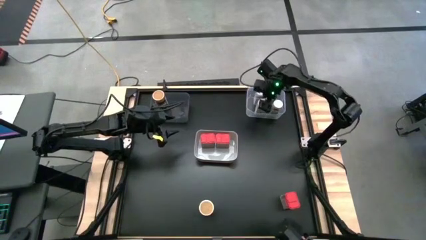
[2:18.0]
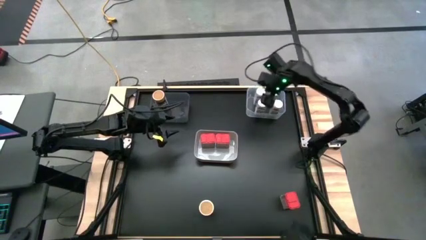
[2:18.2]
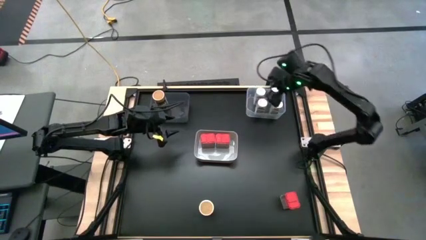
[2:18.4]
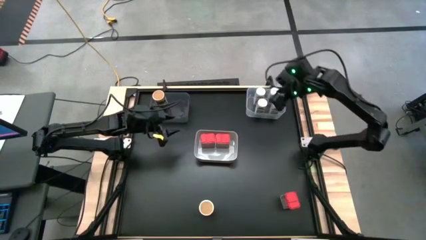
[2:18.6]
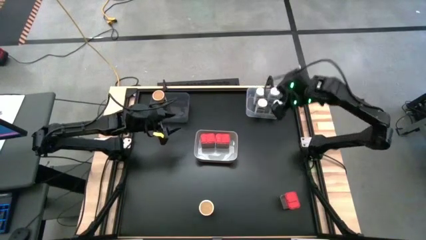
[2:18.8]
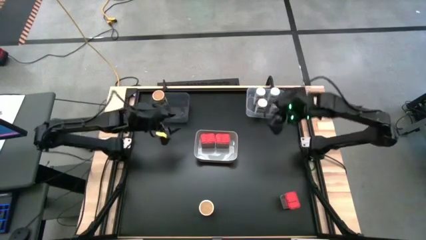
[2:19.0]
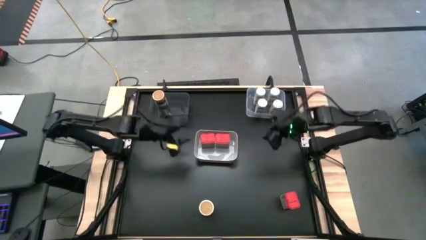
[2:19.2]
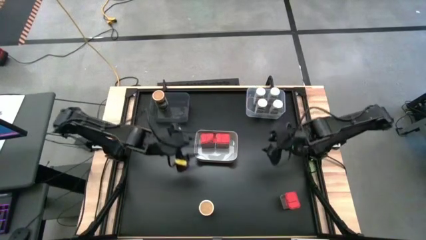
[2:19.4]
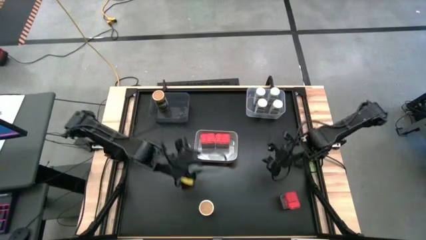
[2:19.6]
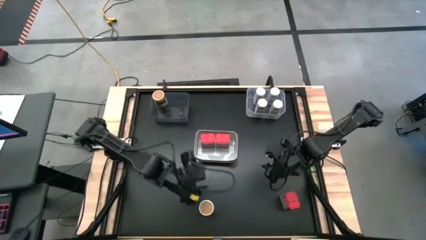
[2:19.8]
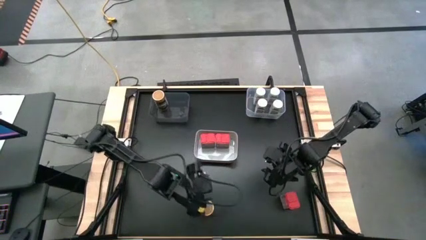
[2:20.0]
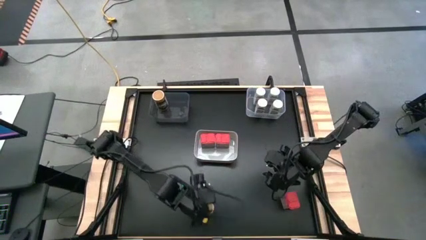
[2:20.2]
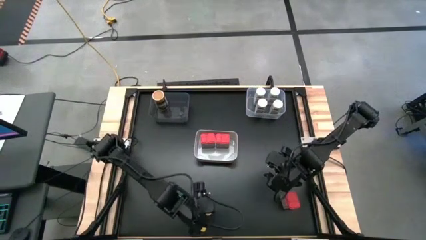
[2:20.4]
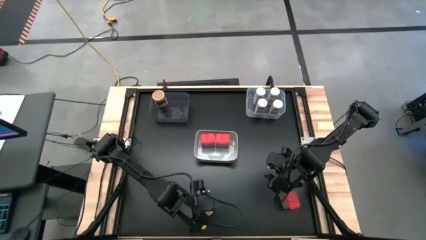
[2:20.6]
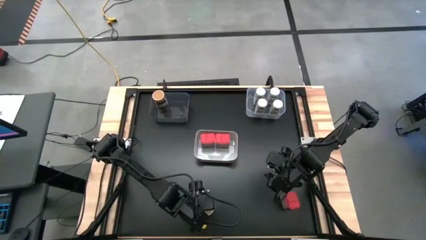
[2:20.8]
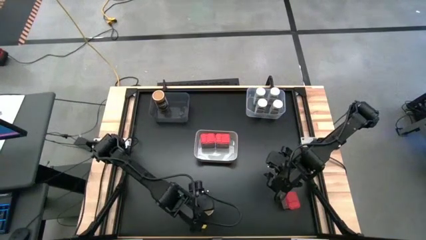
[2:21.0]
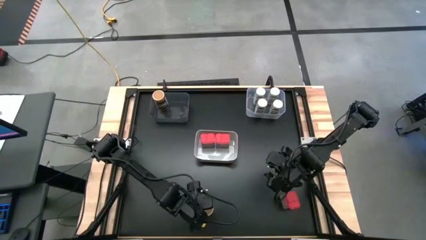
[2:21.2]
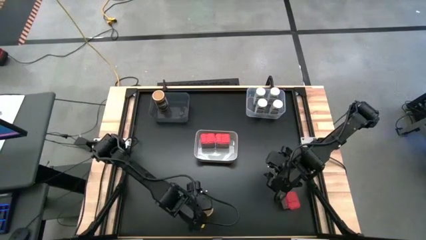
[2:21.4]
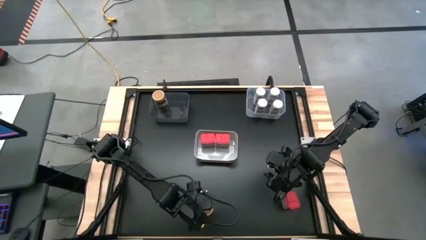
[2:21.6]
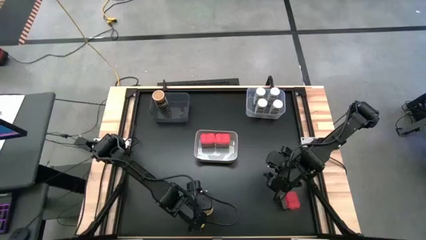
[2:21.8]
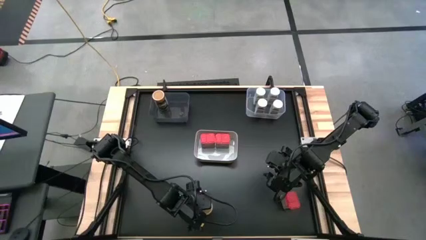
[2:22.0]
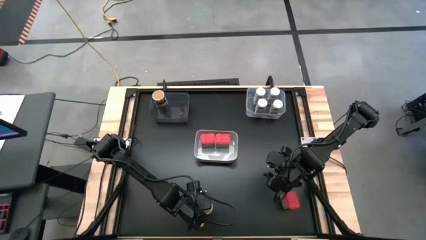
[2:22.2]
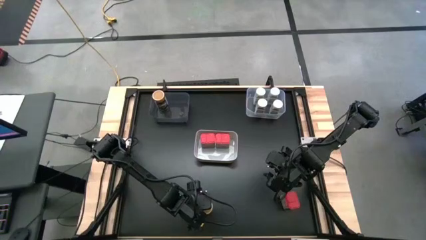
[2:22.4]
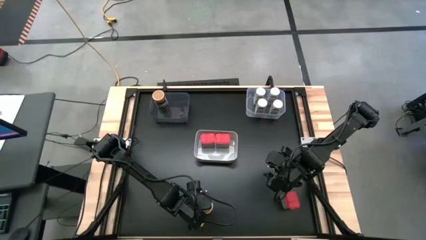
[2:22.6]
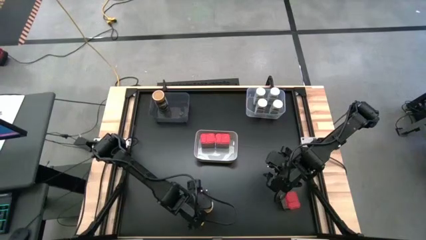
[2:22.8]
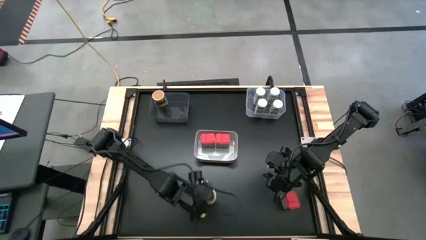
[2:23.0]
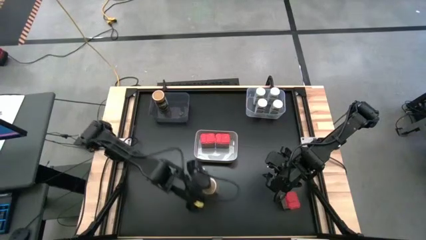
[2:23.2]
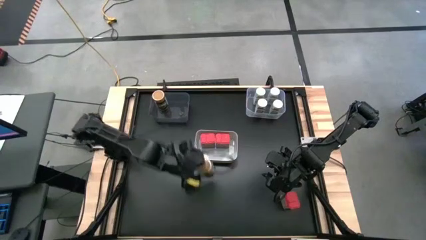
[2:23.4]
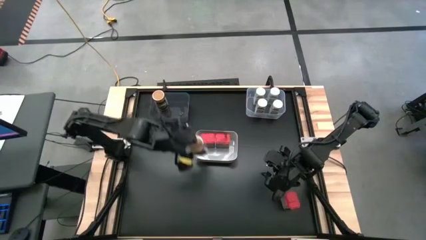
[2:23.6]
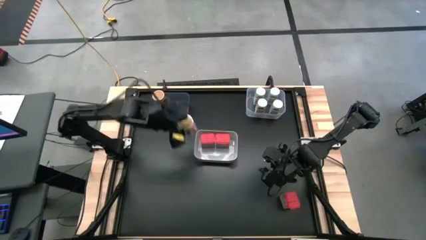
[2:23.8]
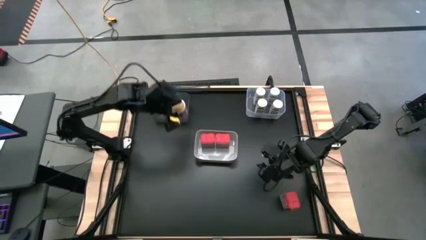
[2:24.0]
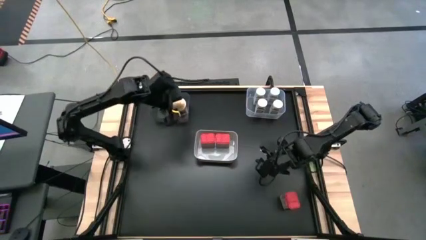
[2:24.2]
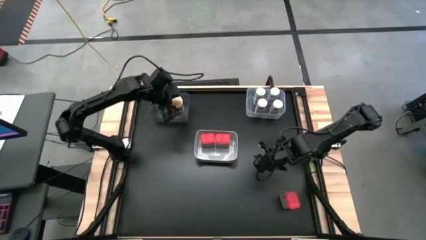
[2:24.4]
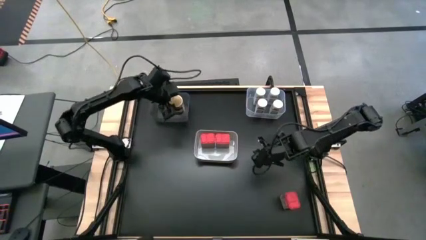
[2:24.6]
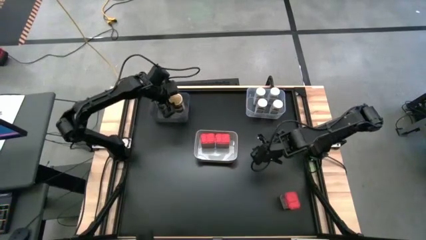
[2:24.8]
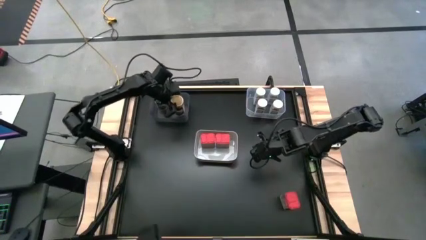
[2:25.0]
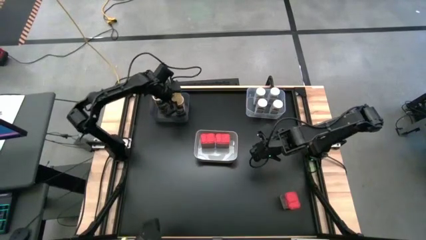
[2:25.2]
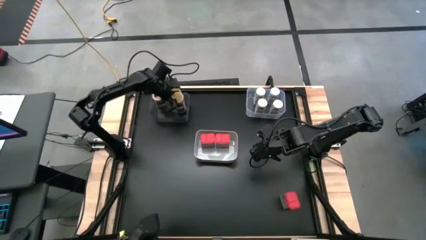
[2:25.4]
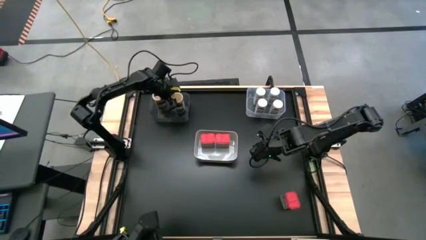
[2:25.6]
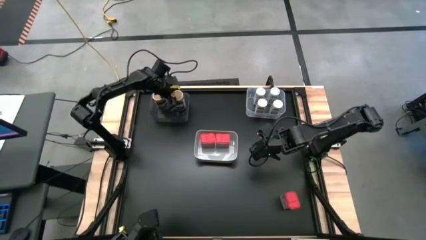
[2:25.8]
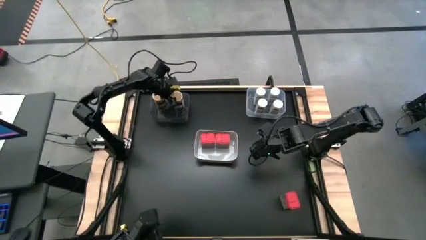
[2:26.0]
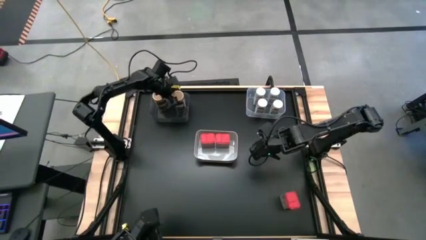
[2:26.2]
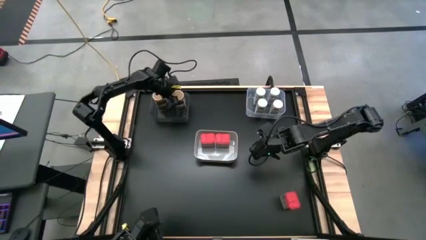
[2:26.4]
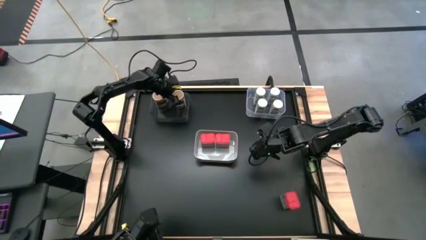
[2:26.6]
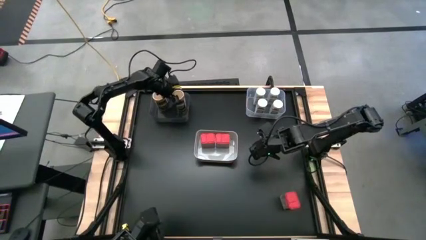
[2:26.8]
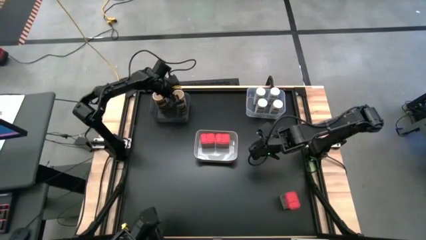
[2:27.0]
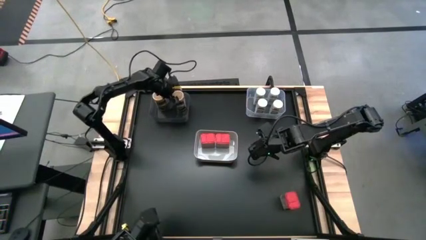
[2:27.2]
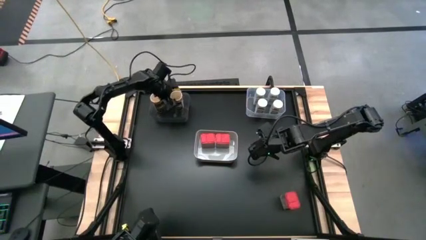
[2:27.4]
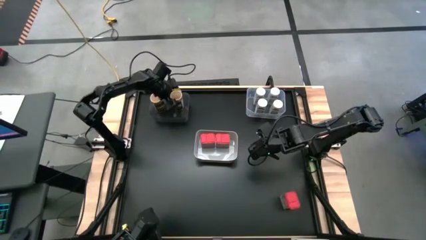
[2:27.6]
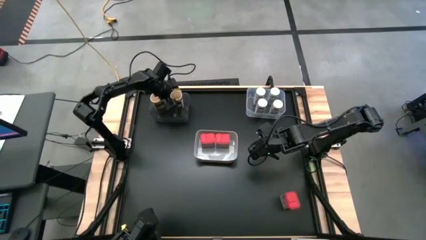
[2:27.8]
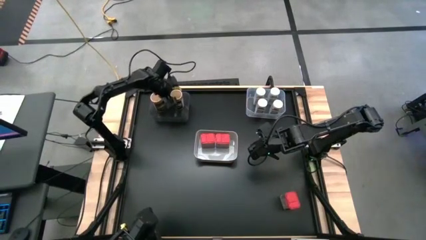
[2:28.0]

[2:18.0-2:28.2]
Task: Sort spices by type
Put the golden seasoning bottle into the black bin

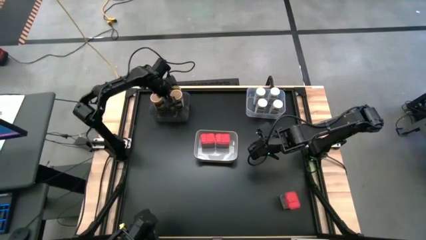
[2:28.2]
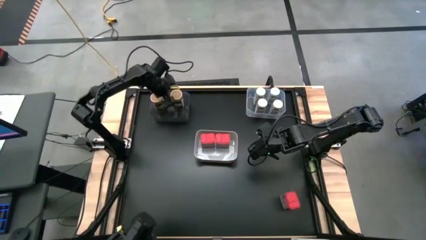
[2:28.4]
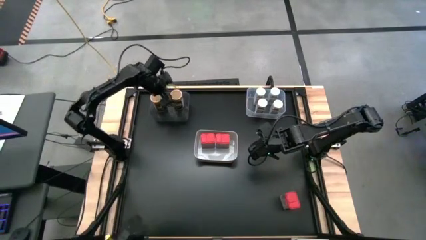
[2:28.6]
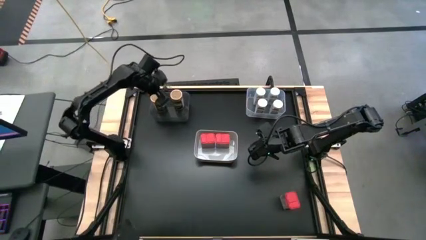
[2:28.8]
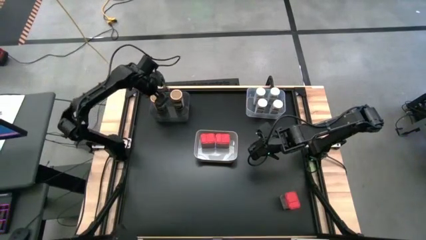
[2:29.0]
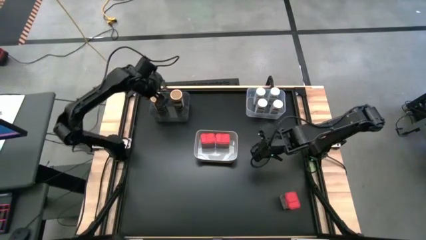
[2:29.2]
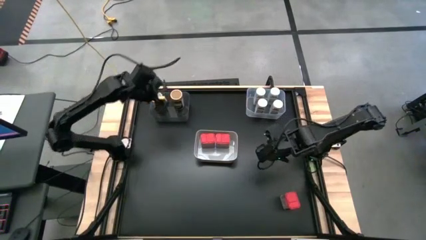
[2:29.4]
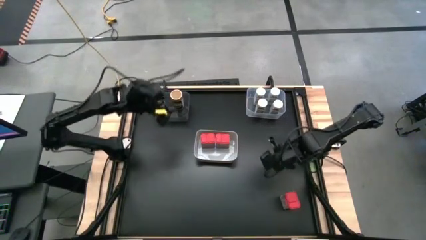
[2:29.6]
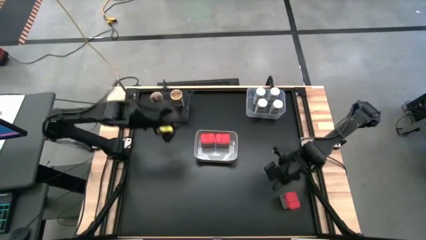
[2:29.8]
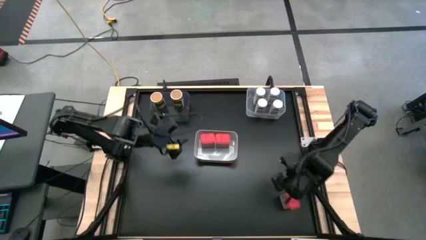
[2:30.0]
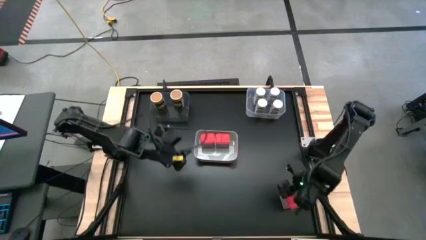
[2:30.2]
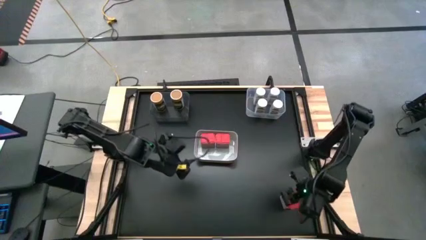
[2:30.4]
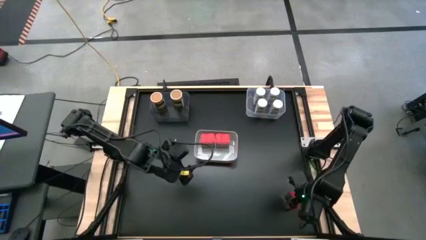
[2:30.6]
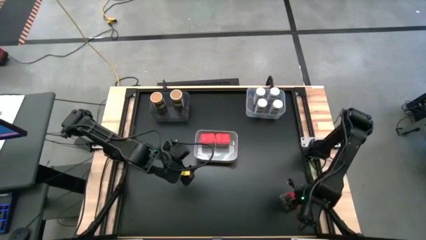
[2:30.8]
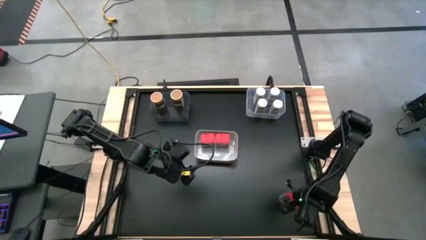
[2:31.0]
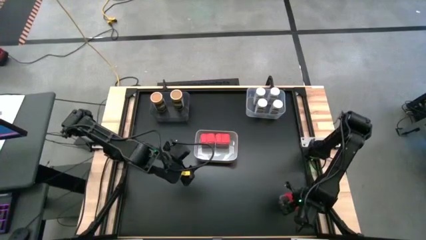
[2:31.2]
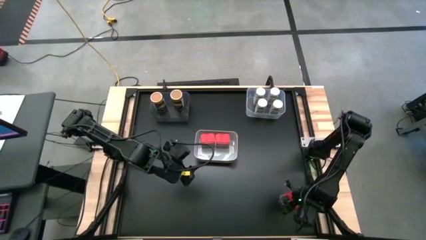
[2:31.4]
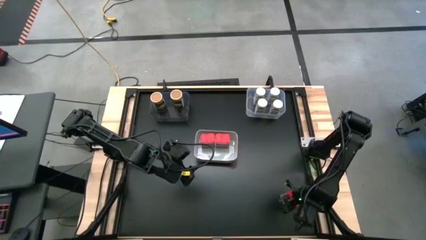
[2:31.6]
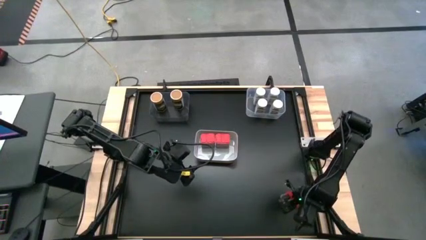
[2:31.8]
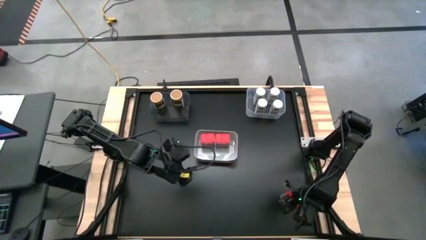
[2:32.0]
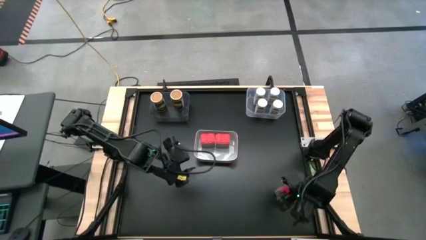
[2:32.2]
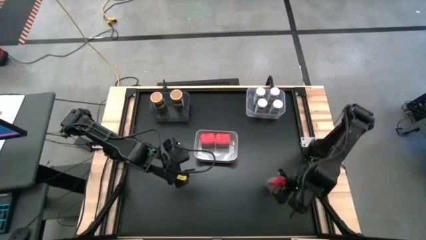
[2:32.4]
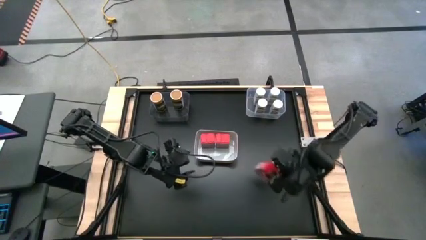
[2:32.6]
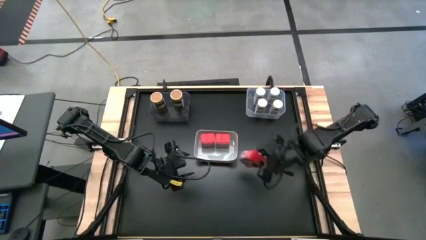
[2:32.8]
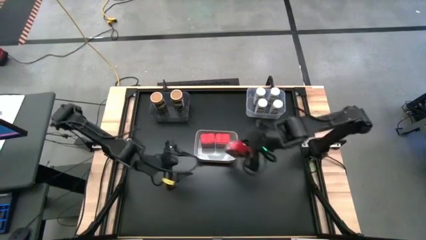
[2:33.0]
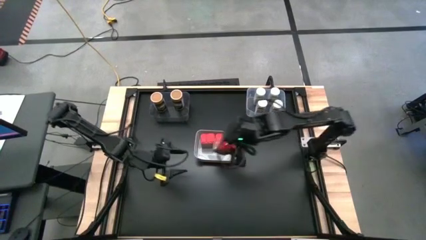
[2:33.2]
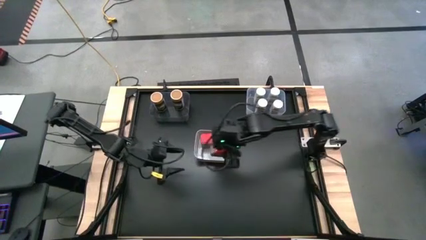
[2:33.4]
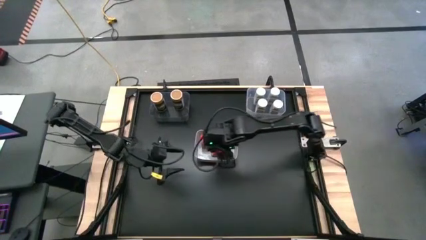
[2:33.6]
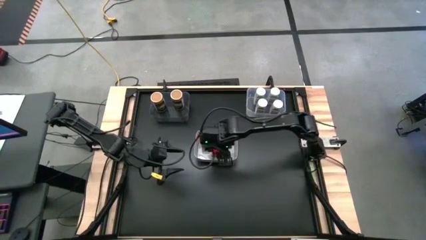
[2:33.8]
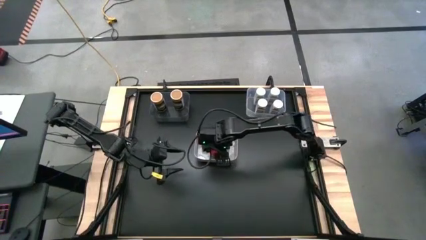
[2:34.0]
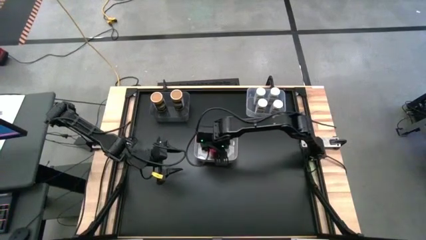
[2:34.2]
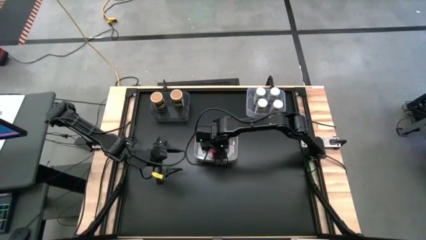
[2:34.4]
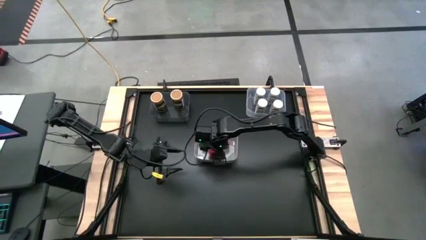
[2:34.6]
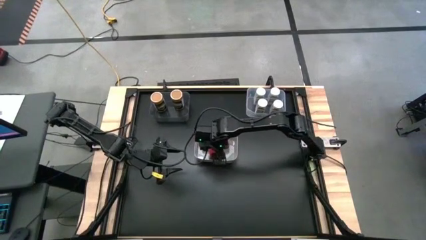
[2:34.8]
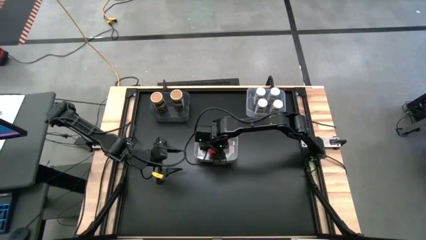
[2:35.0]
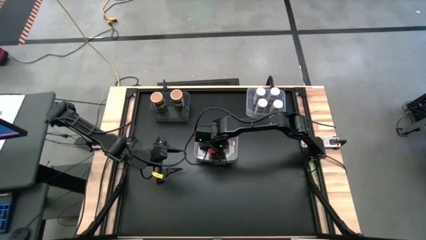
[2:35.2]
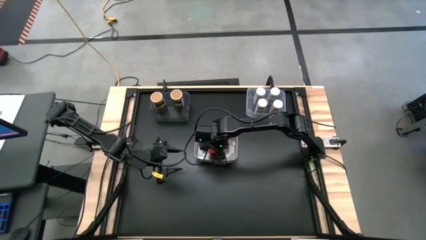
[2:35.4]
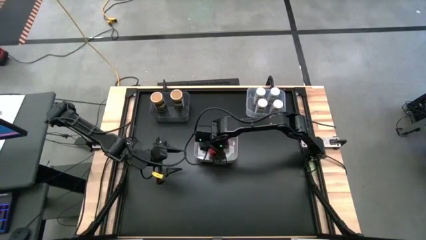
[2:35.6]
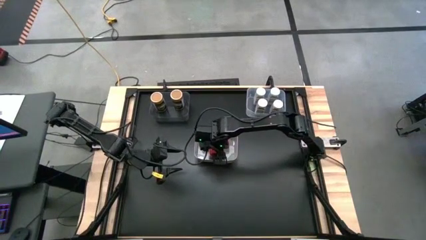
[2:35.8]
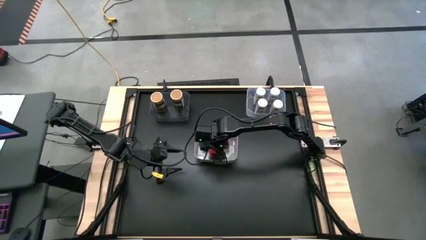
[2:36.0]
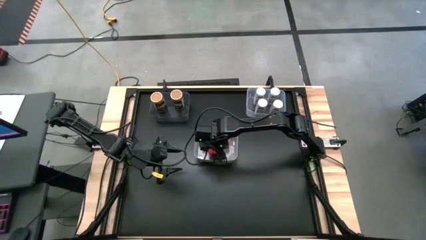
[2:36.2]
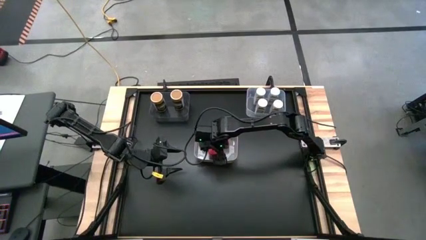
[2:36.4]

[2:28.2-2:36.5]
Put the red seasoning can into the gray bin
